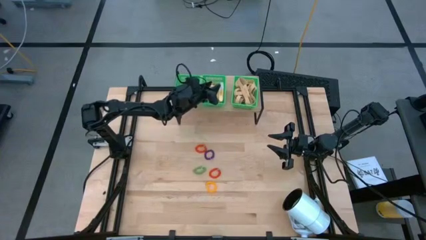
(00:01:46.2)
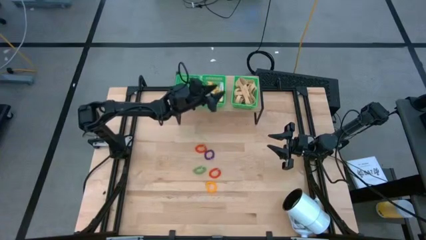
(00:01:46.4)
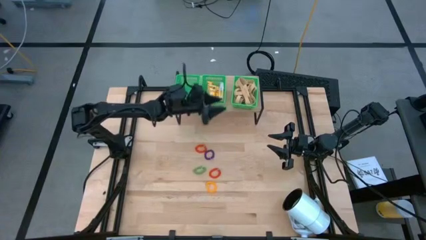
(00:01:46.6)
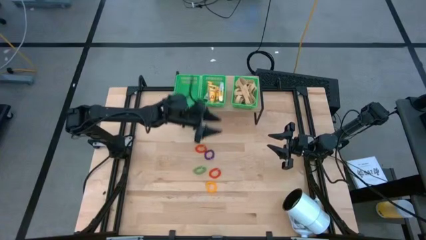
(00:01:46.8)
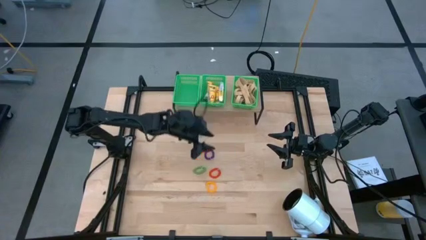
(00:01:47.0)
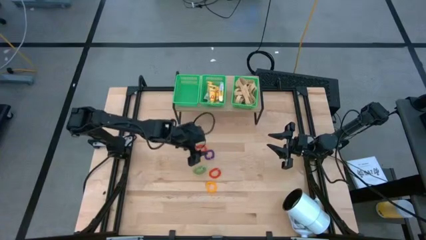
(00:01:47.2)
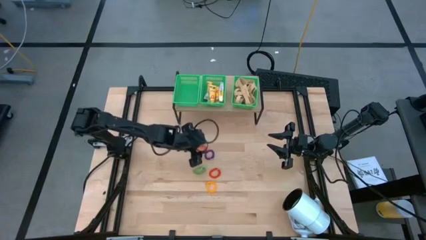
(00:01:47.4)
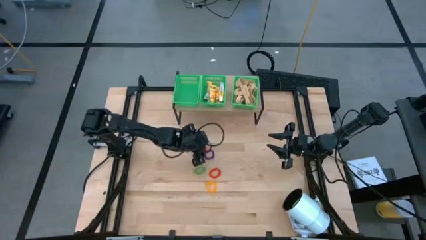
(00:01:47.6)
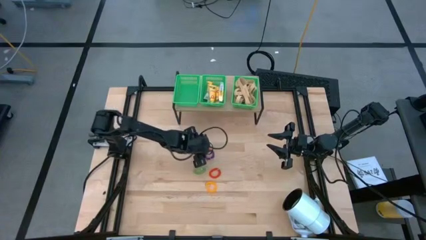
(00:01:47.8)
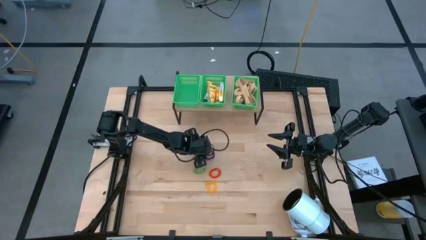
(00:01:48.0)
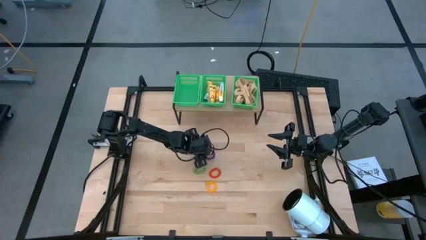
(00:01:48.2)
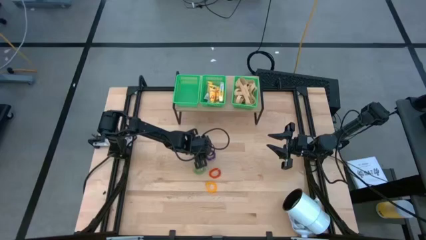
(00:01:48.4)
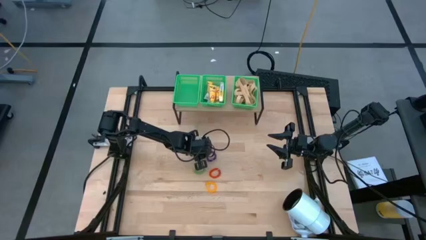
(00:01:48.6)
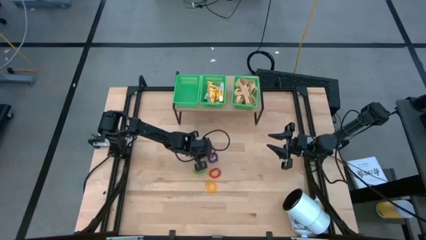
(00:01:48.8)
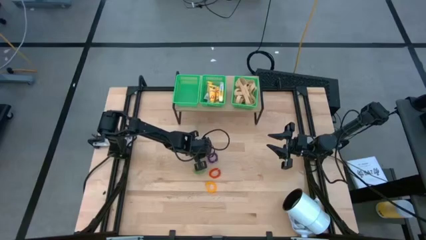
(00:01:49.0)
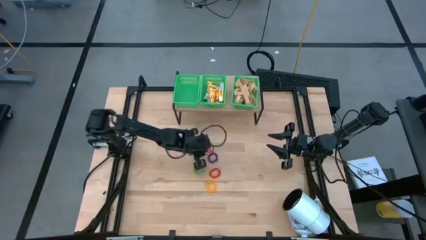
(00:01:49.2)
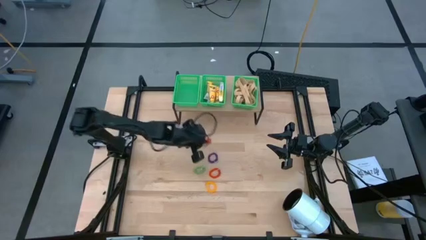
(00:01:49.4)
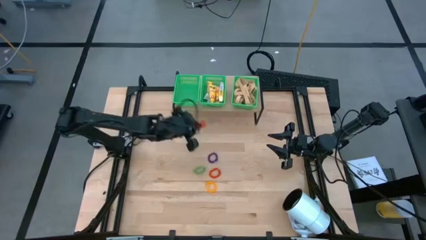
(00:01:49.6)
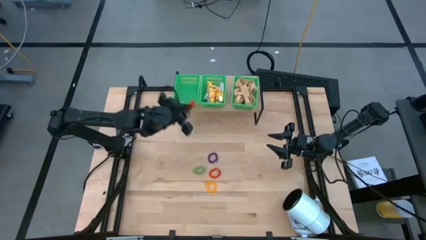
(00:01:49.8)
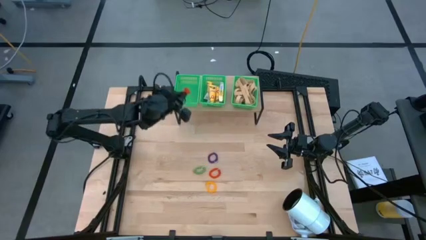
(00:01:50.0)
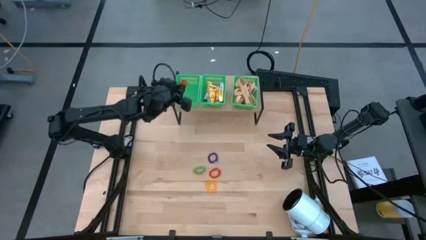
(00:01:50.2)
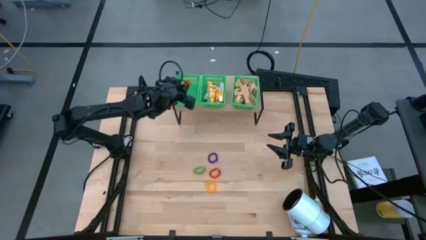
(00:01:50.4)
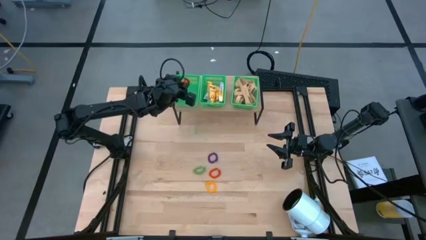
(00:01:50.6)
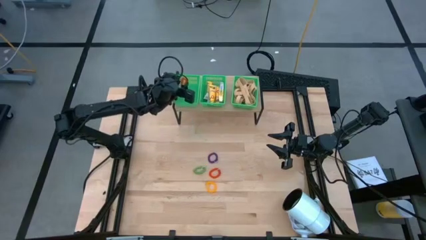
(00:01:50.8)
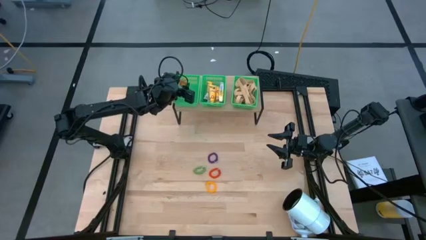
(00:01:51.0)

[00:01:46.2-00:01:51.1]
Task: Pick & Place Office Desk Supplies
Put the orange spring keychain into the left green bin on the shelf

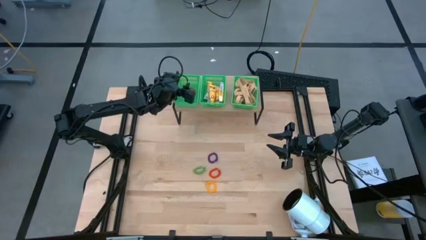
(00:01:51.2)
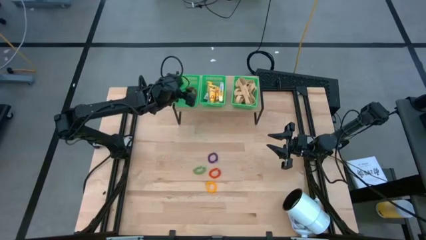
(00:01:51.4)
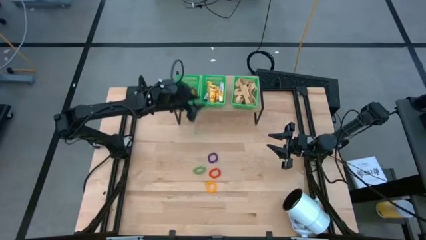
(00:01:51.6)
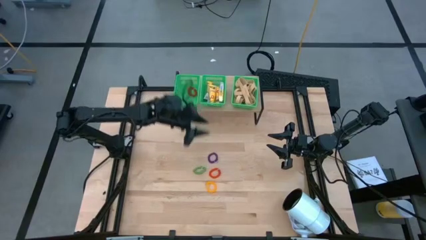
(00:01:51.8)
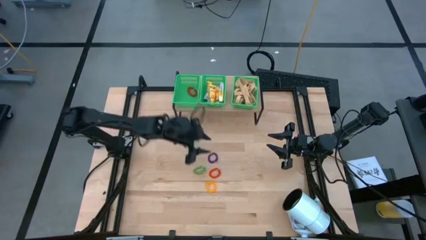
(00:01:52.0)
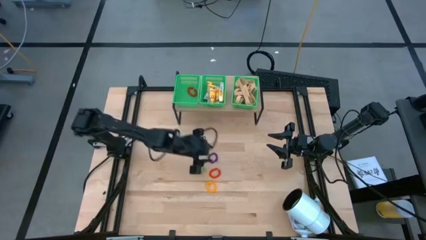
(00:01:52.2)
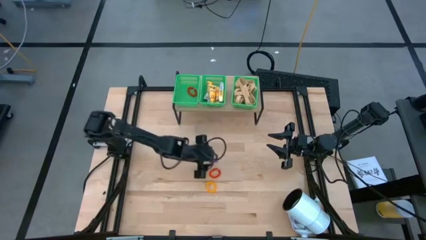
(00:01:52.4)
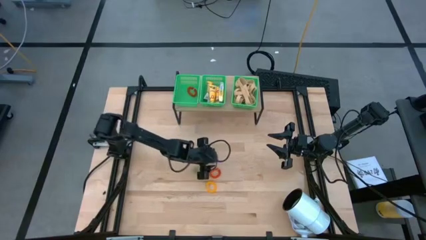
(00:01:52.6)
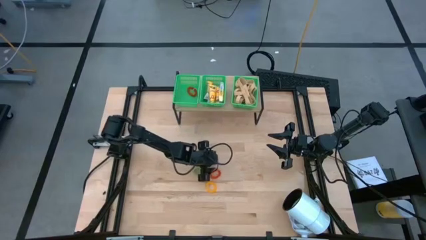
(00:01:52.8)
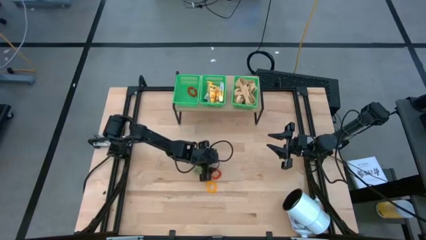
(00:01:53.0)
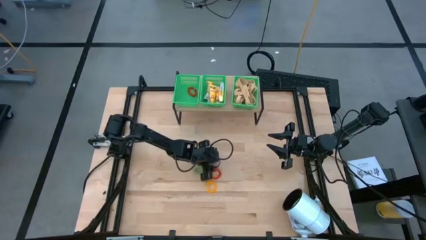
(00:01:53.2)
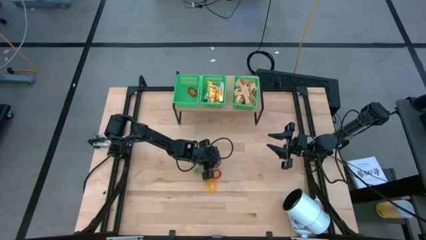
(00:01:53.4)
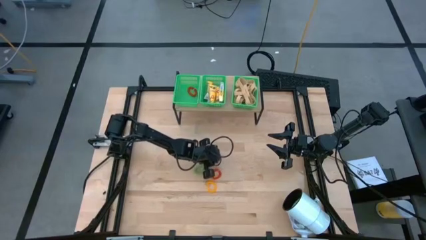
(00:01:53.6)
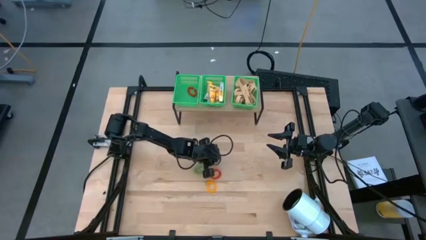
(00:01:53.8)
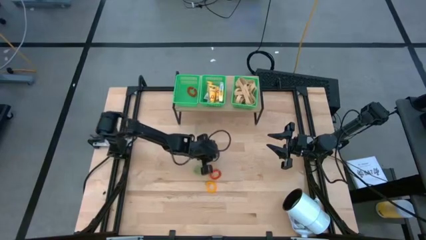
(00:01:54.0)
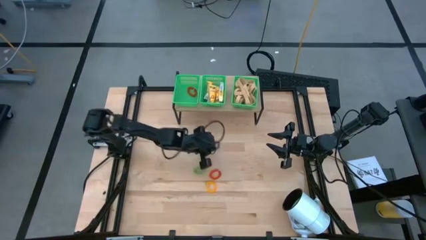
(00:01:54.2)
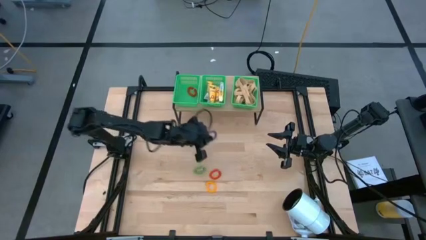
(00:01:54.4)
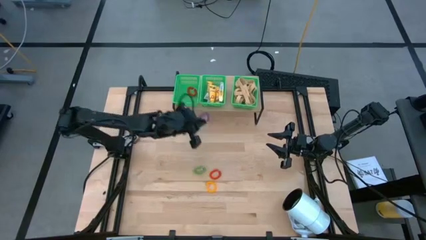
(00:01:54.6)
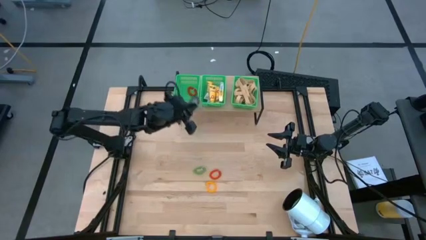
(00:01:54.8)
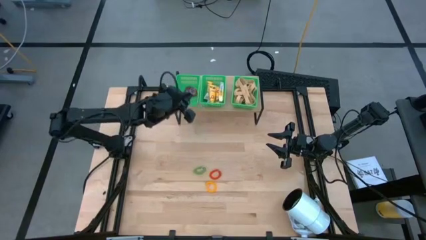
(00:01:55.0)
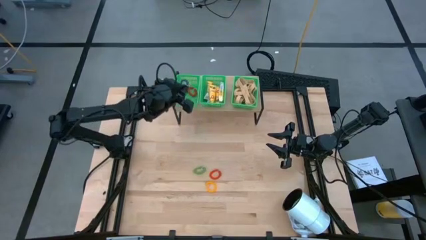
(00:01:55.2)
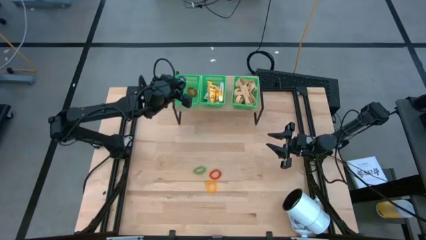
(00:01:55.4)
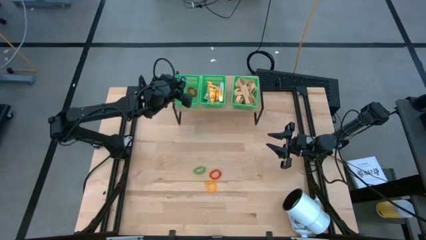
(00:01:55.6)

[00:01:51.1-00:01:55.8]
Put the violet spring keychain into the left green bin on the shelf

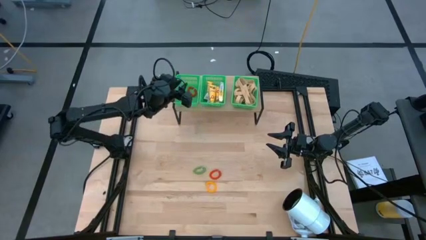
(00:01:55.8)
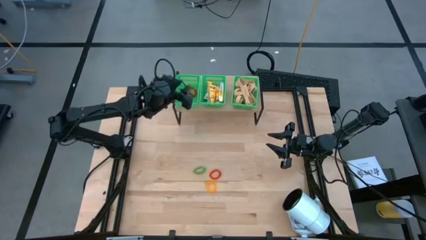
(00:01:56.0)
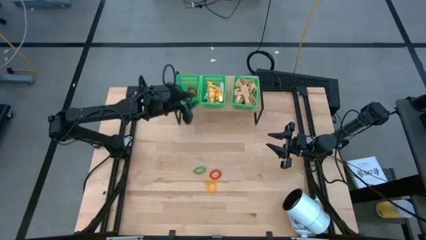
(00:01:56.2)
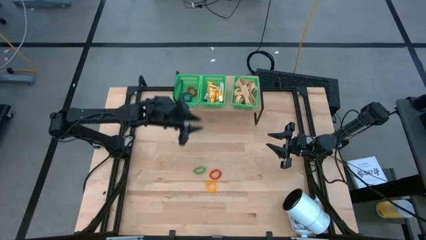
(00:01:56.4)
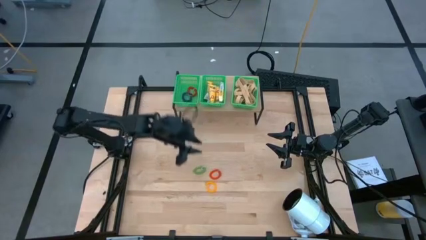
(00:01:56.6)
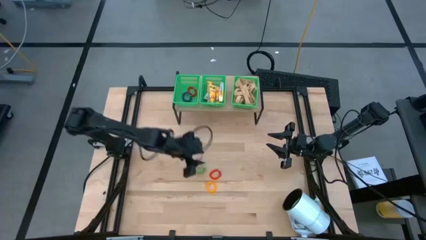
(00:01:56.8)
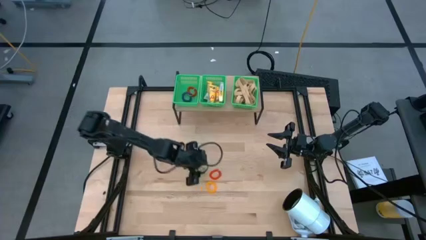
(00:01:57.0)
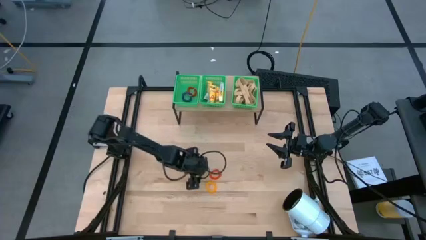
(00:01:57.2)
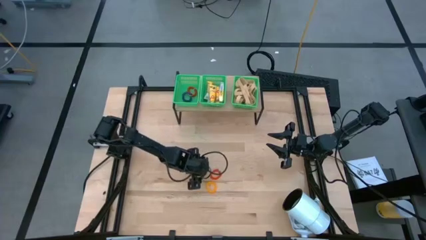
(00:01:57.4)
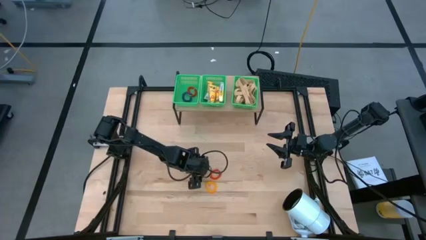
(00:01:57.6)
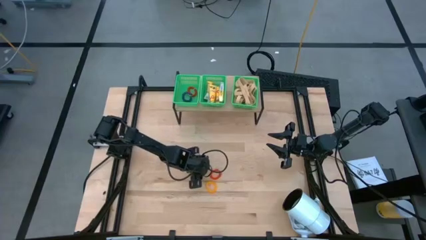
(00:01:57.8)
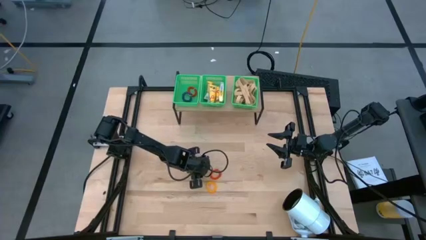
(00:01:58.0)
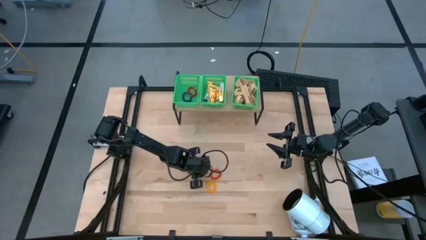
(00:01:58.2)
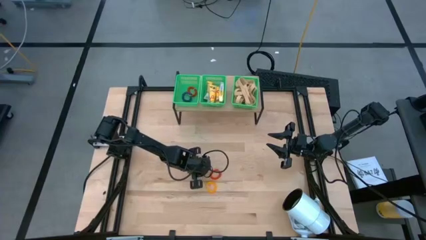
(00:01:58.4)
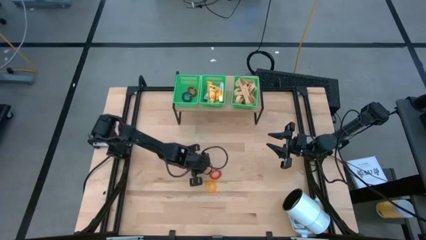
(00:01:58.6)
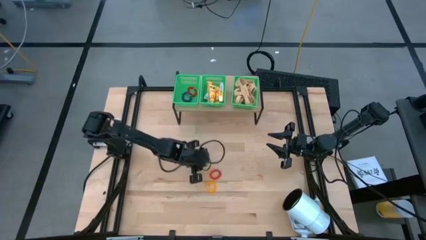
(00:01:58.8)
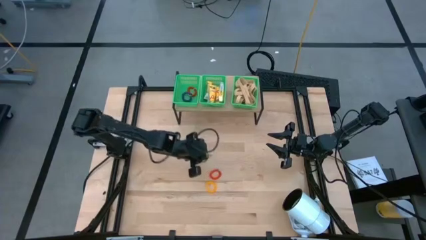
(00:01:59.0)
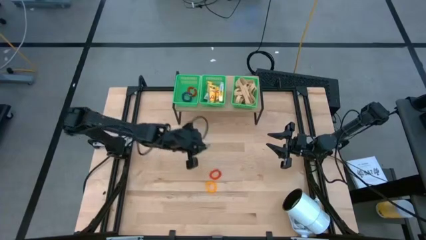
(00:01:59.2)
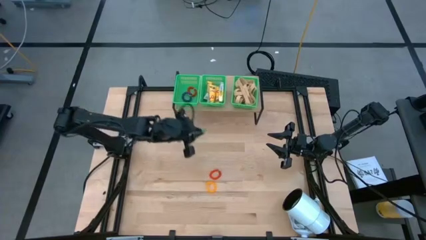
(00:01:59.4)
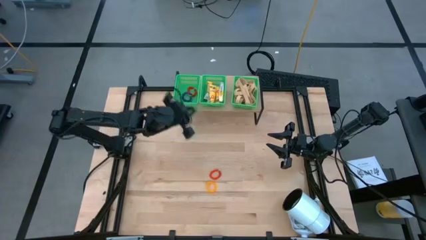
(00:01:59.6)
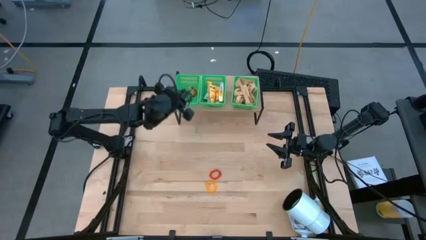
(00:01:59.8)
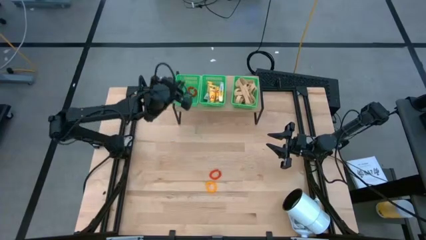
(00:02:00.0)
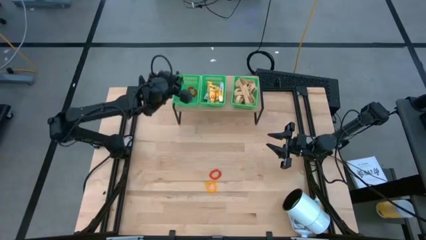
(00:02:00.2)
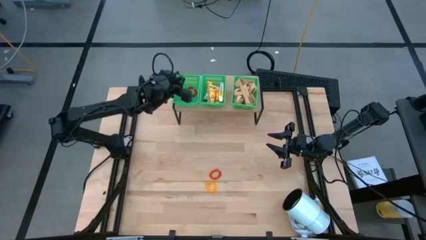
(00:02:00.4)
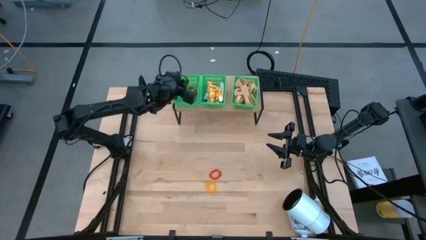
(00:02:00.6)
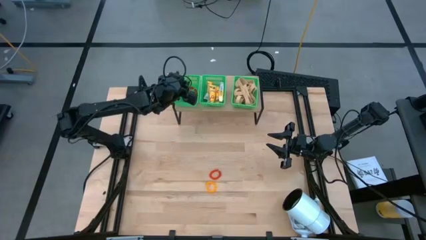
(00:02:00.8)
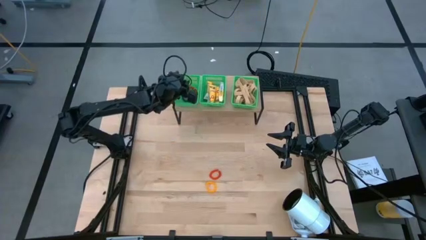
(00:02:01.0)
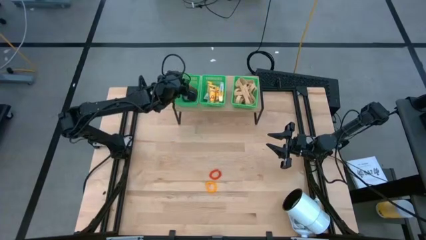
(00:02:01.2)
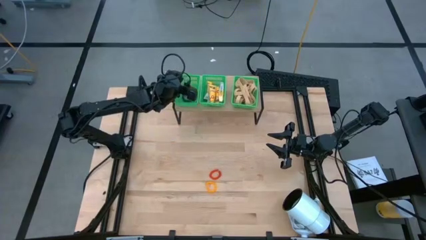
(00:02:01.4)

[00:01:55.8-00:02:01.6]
Put the green spring keychain into the left green bin on the shelf

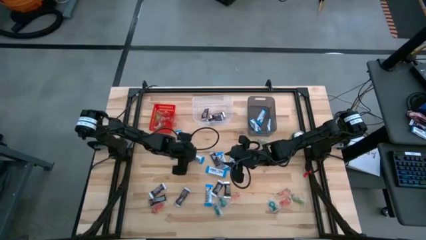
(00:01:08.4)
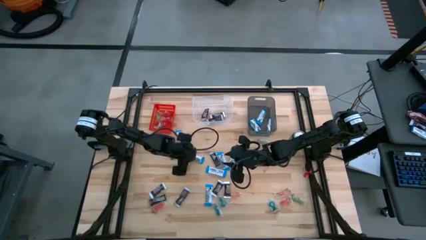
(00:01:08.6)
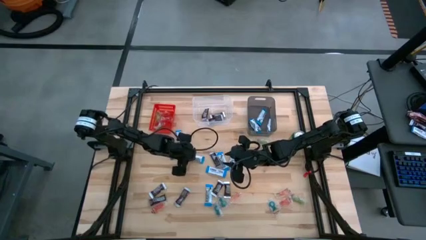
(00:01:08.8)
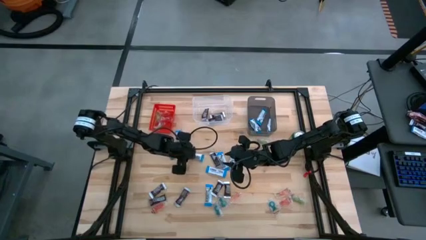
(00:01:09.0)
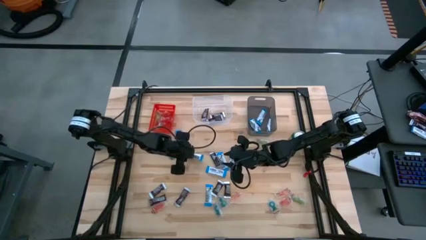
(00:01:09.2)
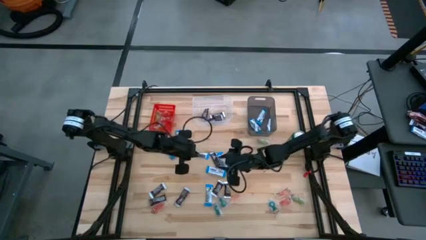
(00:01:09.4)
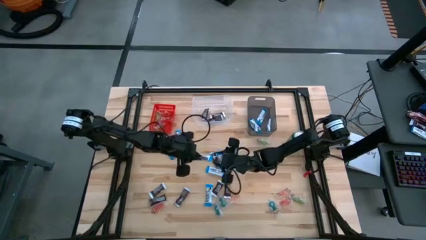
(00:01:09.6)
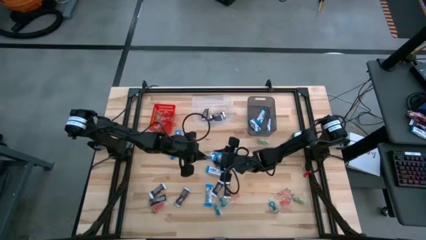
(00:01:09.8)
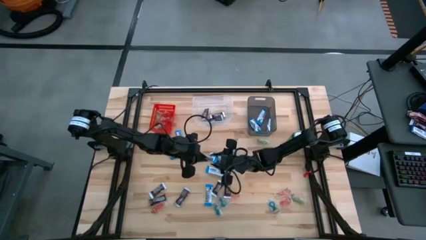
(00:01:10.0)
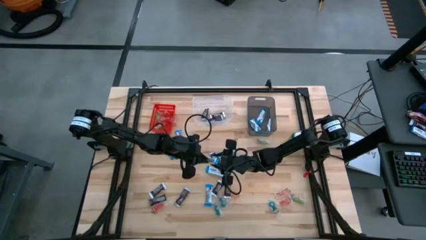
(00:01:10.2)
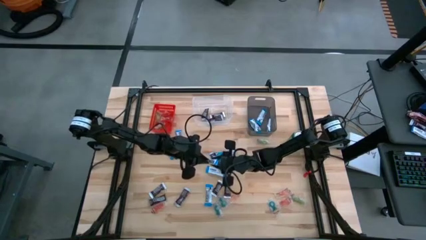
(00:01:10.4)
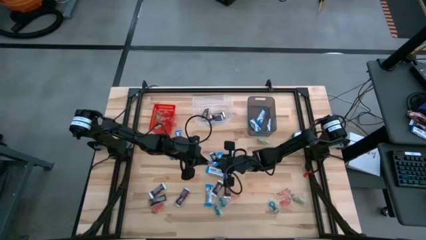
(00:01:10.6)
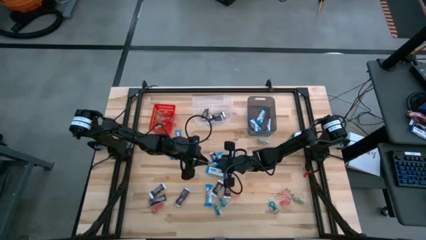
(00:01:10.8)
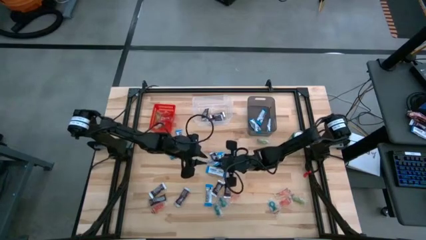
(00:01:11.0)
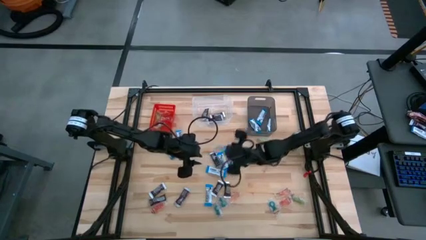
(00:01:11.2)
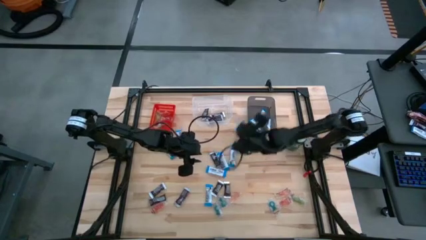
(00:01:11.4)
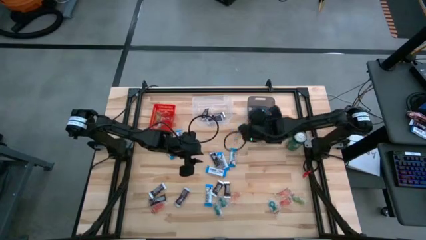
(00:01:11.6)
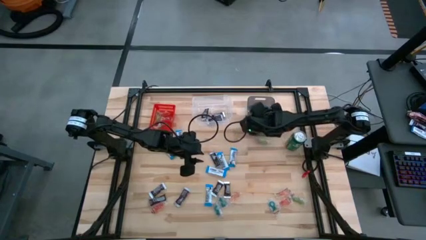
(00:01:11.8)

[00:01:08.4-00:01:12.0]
Task: Sort candy
Put the white chocolate bar into the black bin
